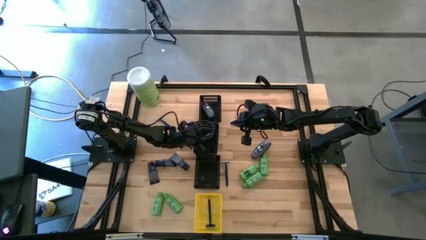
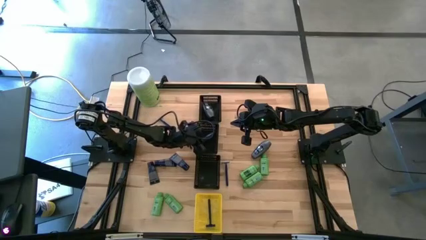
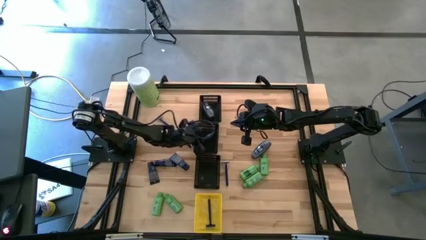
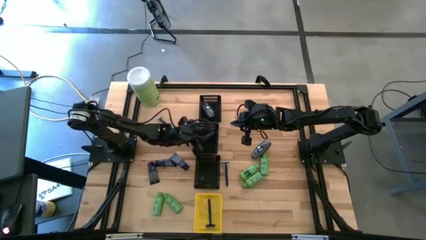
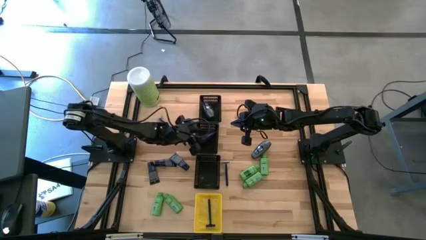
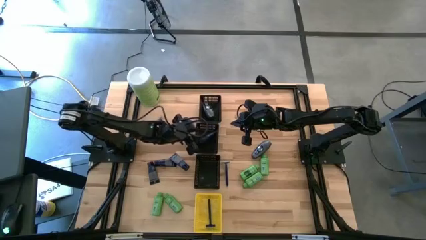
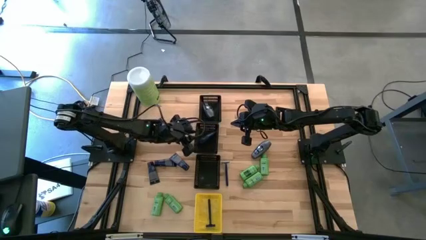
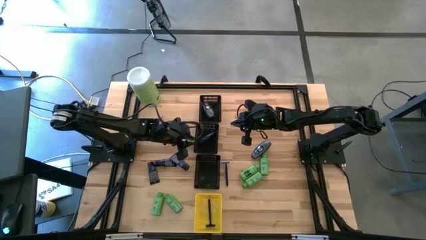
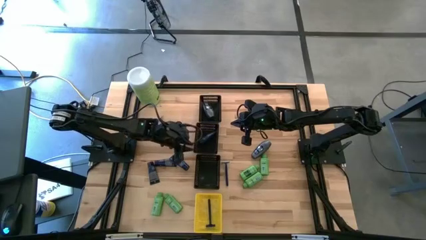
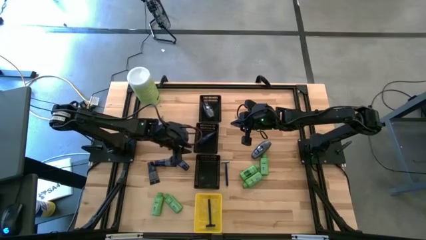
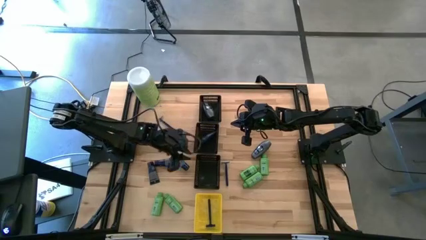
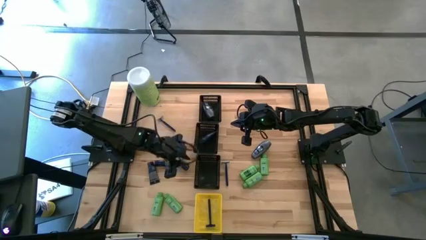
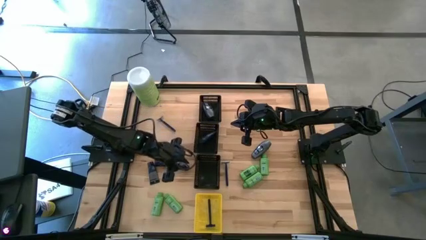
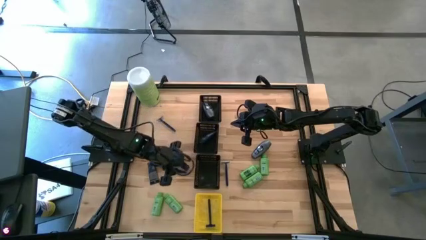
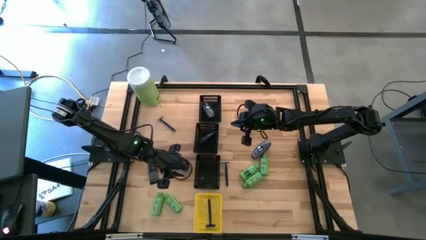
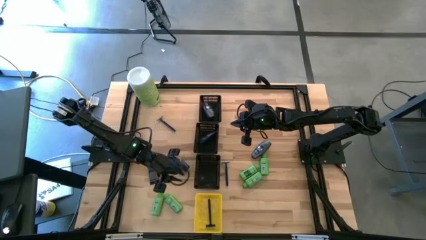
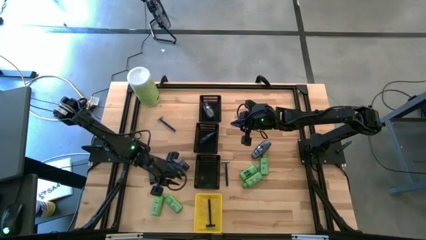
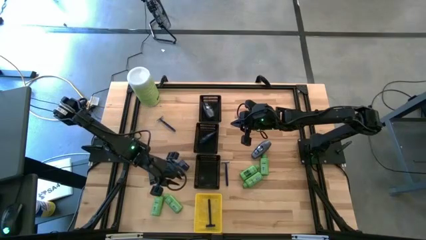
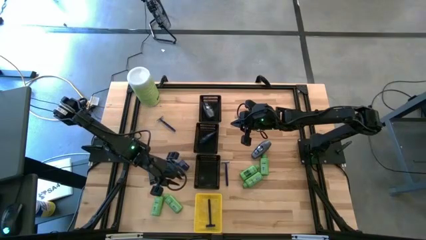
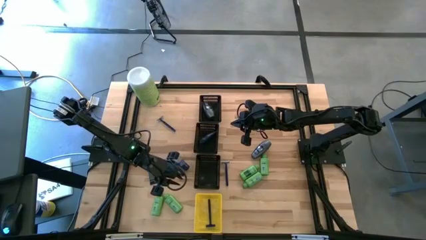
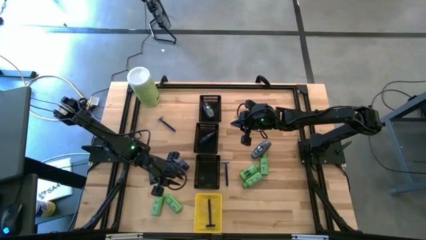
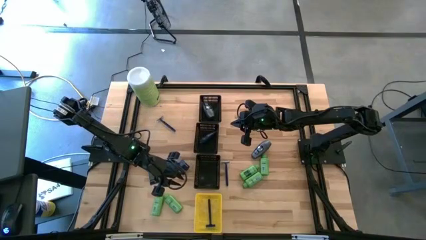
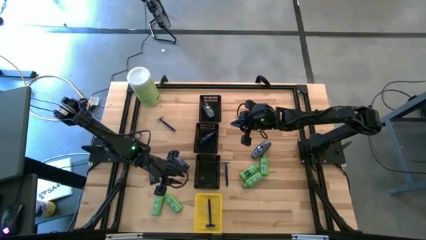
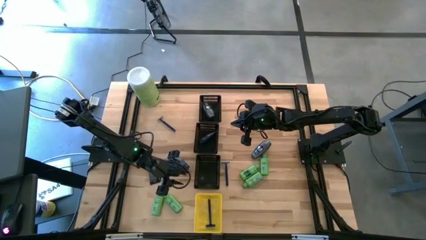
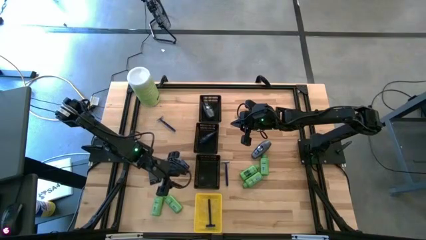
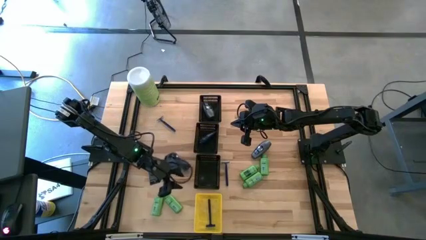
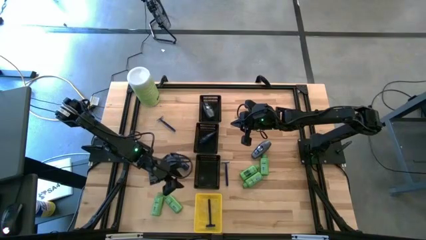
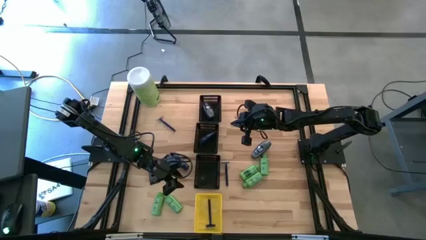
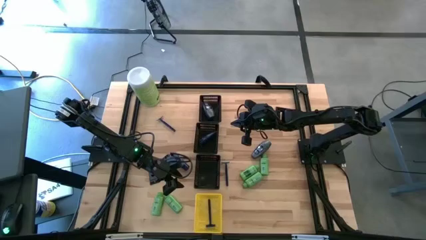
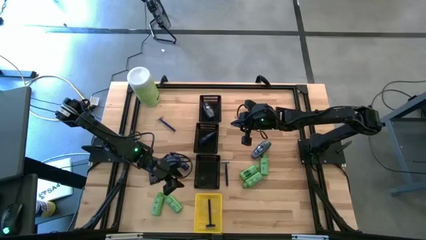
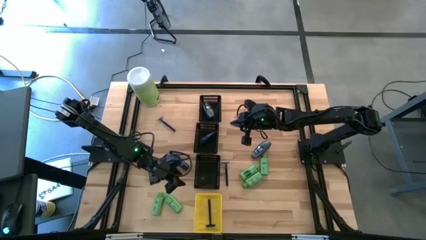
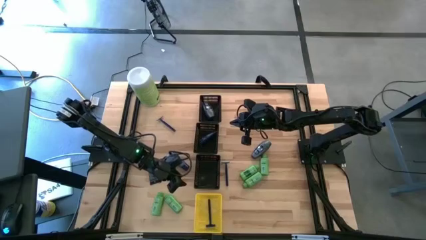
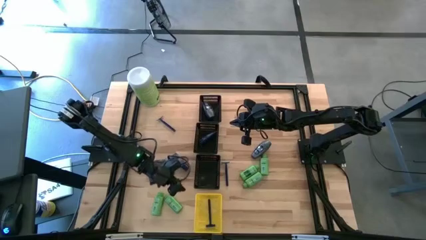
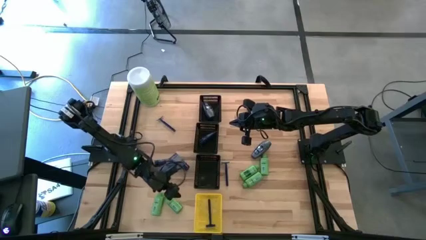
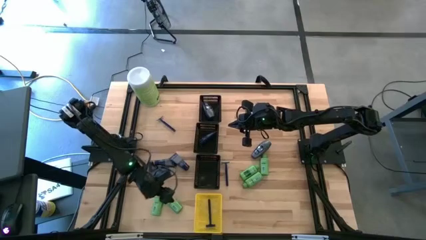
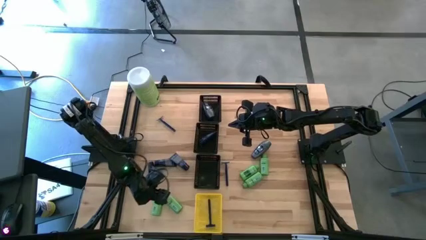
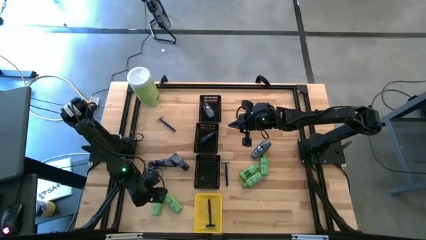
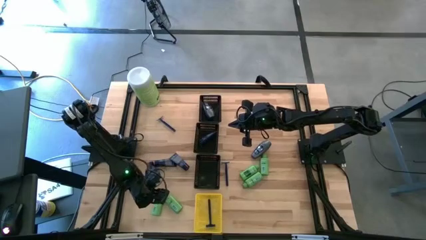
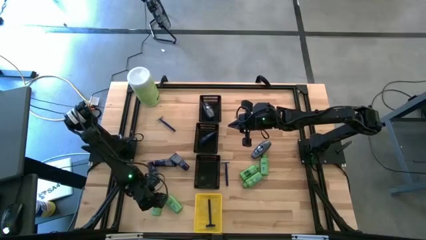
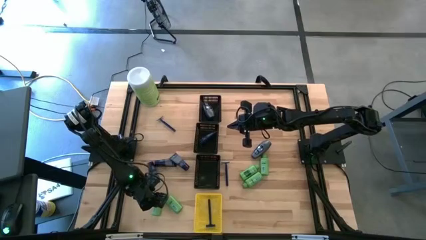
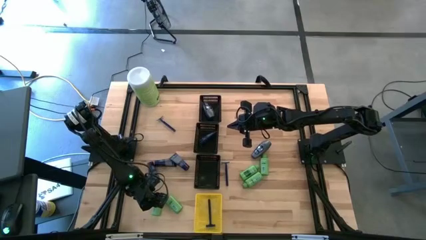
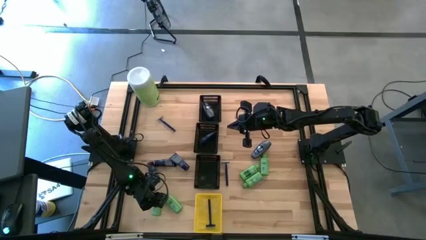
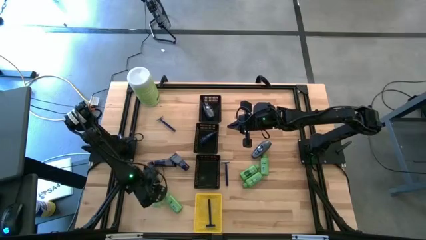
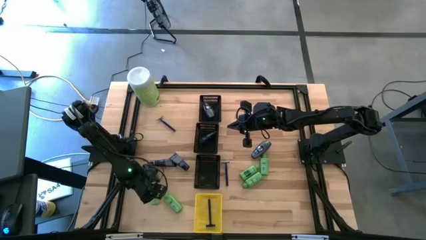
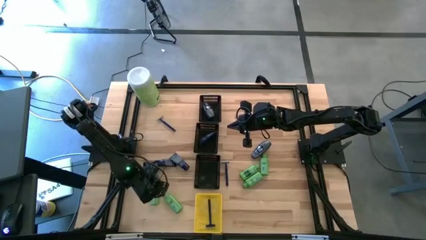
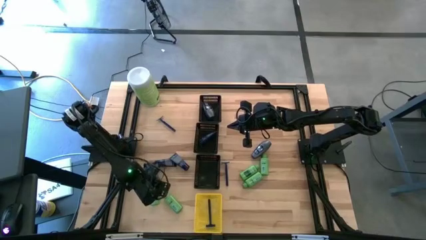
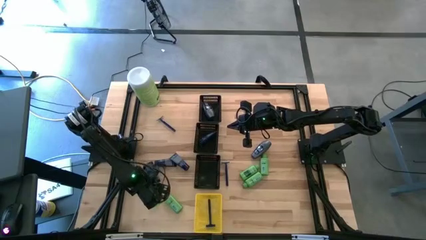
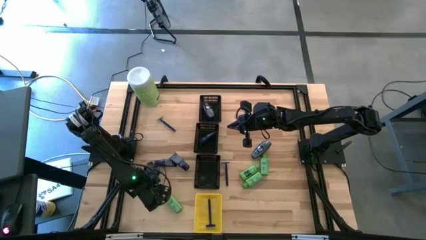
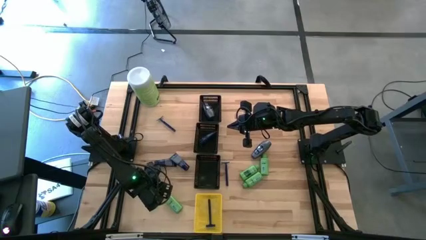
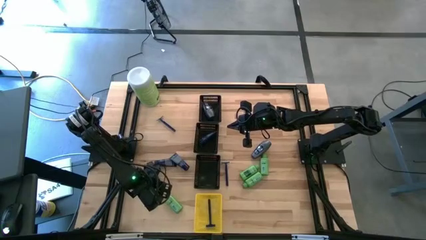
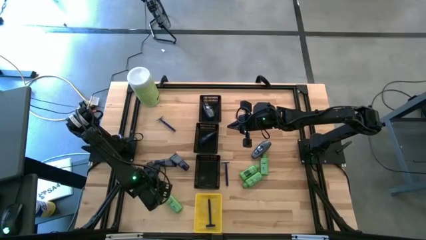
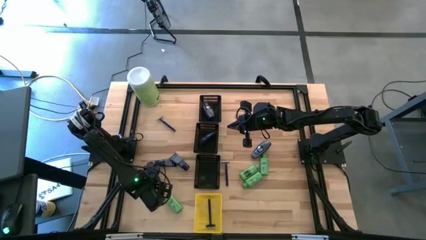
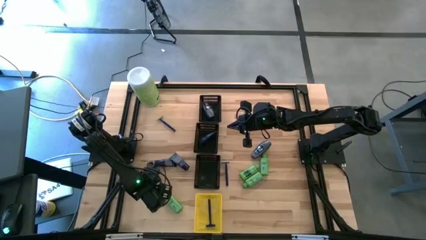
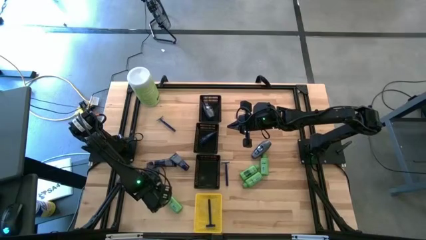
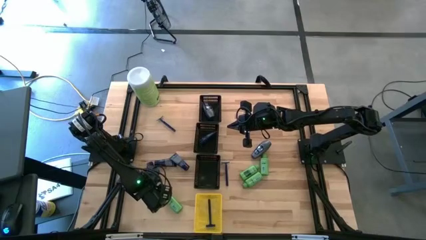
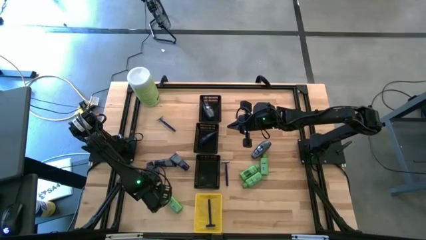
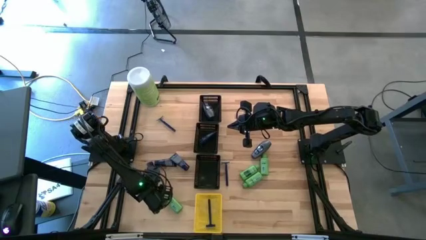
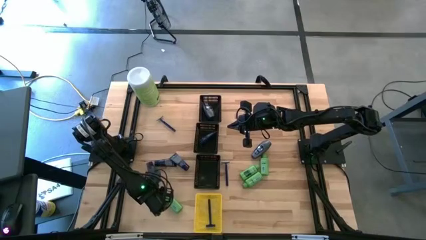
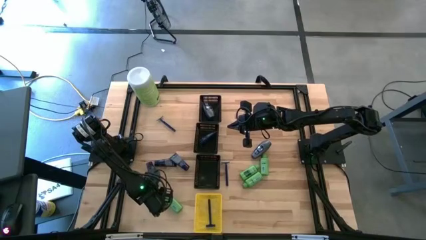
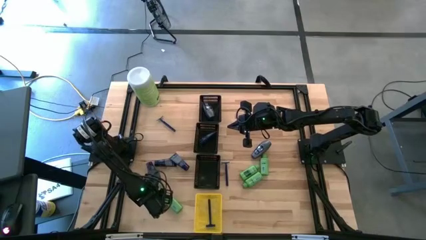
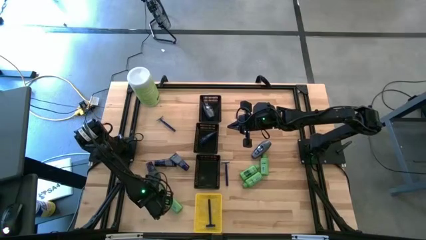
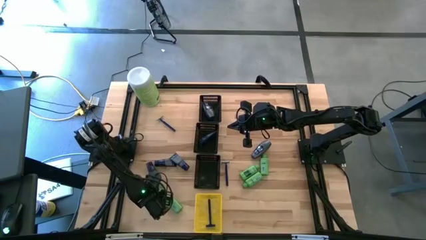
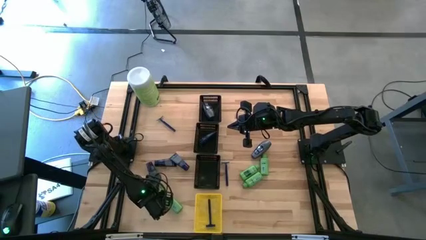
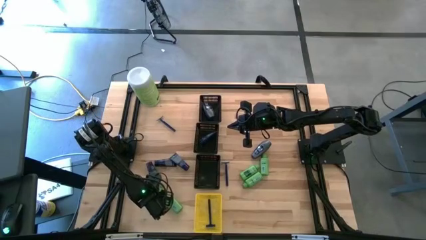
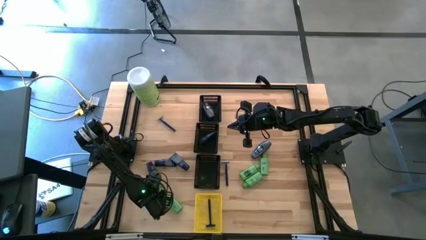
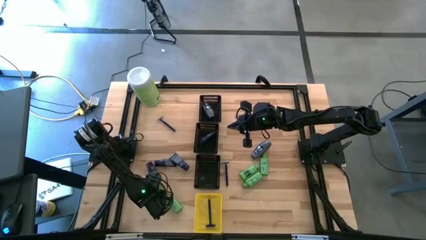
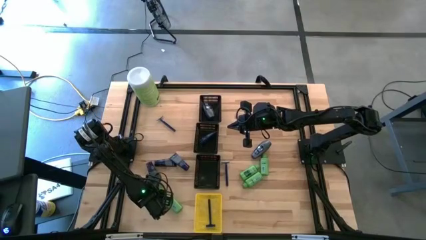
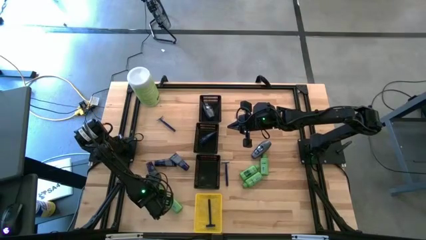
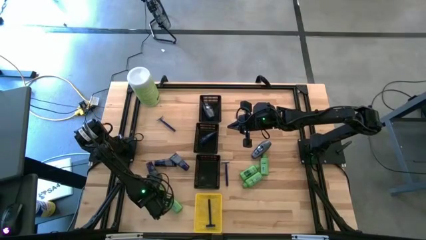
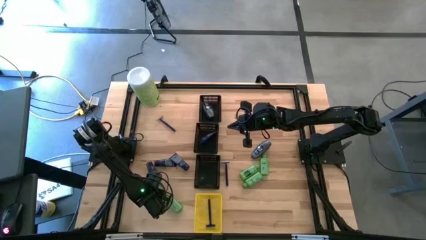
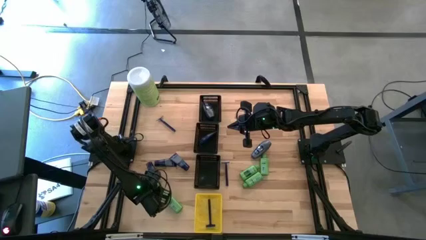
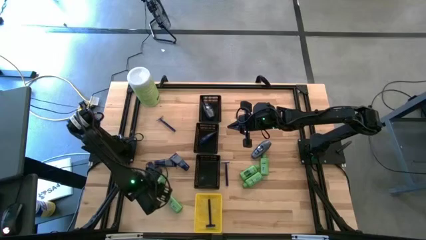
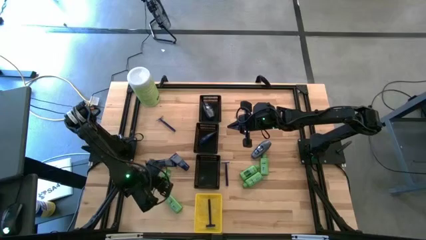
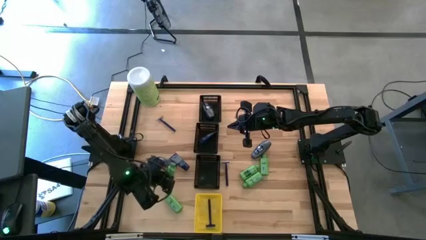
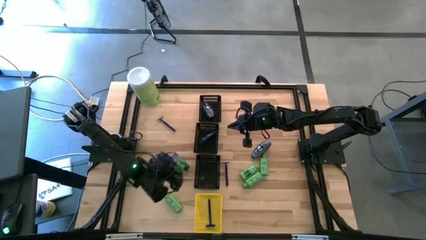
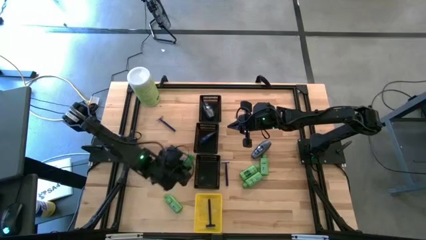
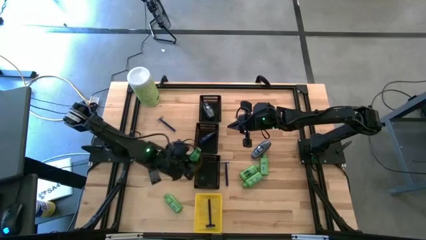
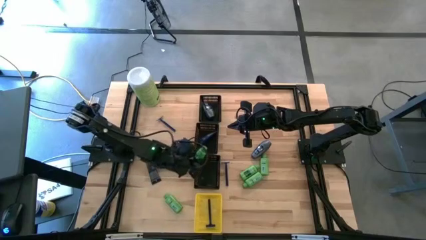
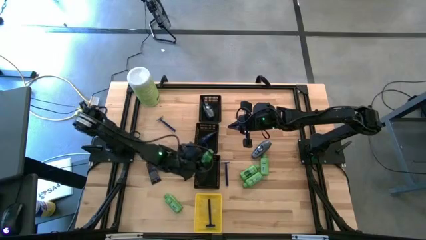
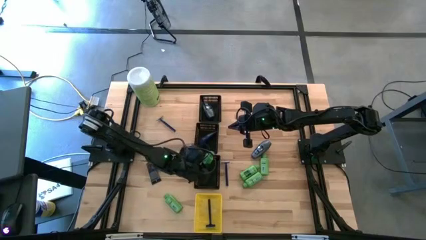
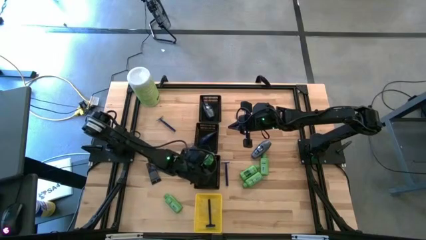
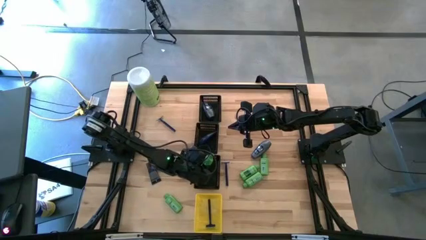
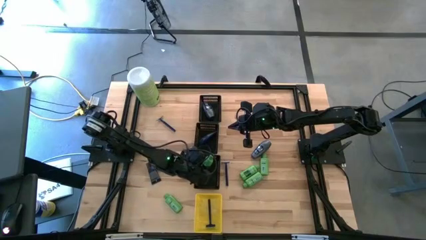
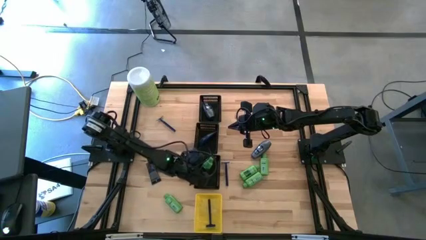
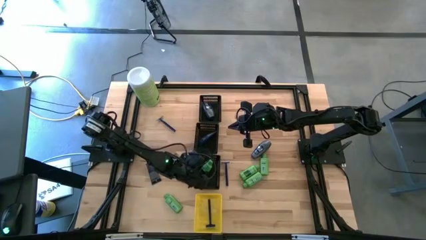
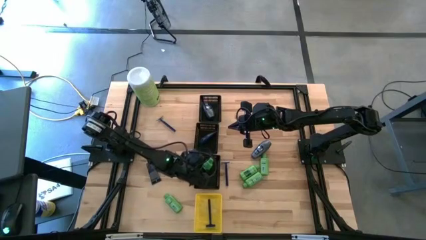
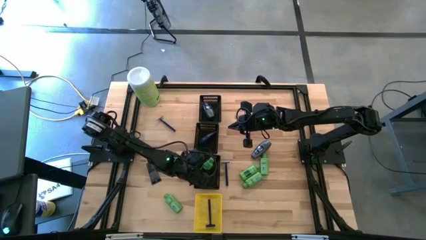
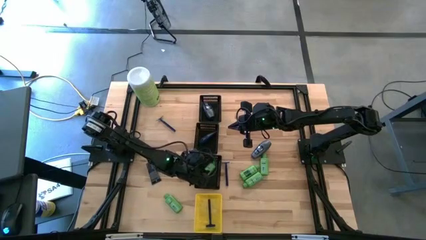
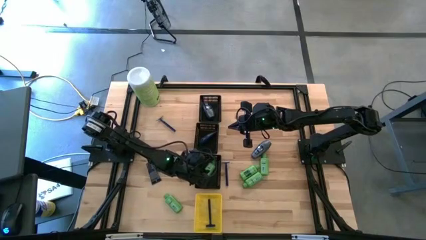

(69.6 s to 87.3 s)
Task: Pick & Place Travel size toiletries
Put the green shampoo bottle into the bottom black bin
